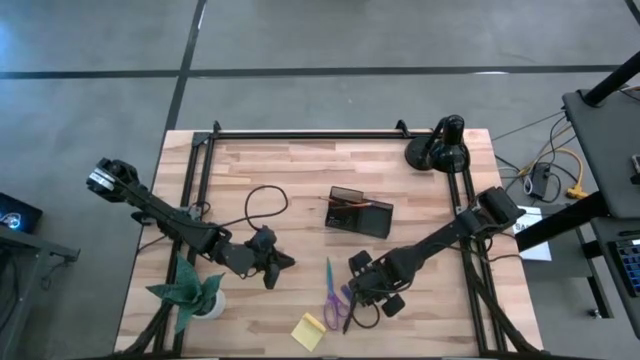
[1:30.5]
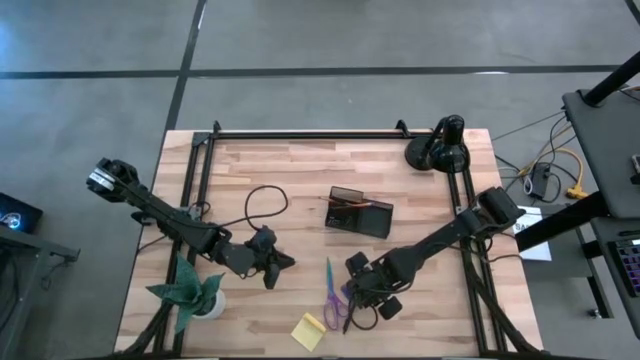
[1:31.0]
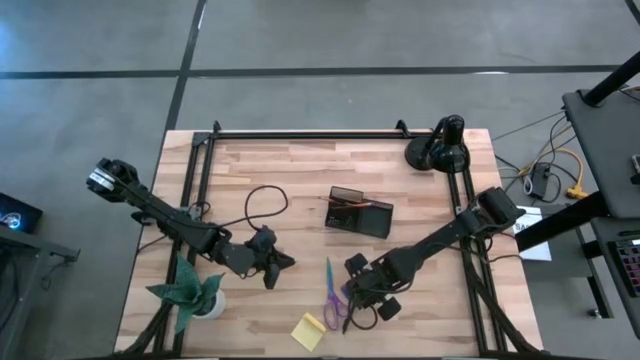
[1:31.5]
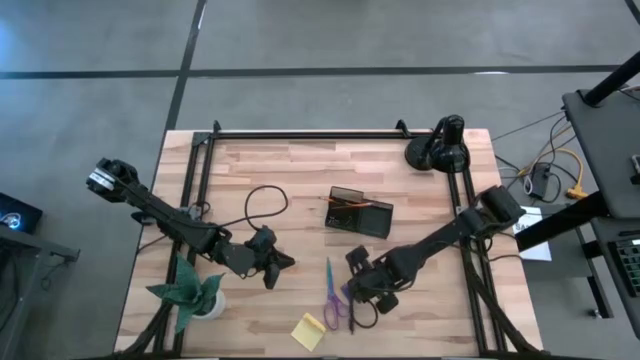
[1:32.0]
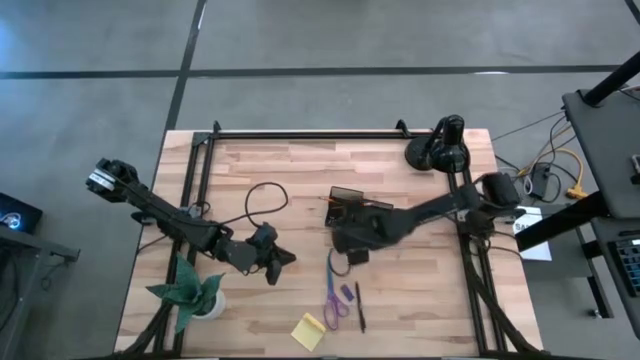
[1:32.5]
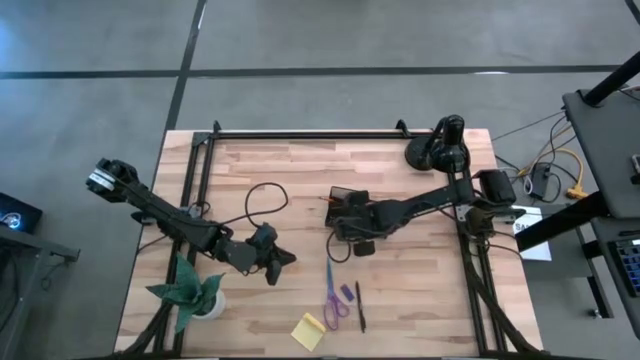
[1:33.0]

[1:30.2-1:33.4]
Task: Pick and place office supplies into organizer
Put the black binder clip into the black desk organizer

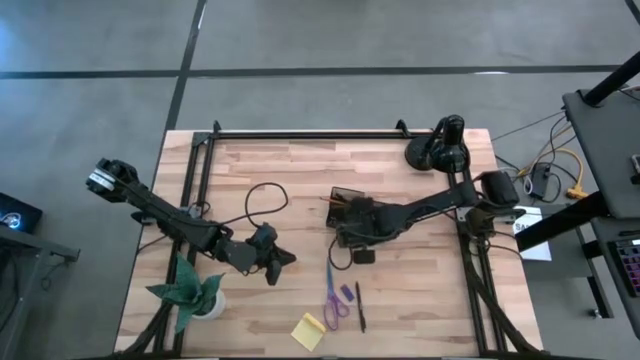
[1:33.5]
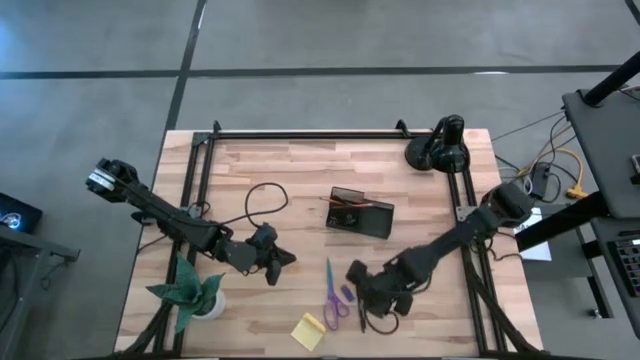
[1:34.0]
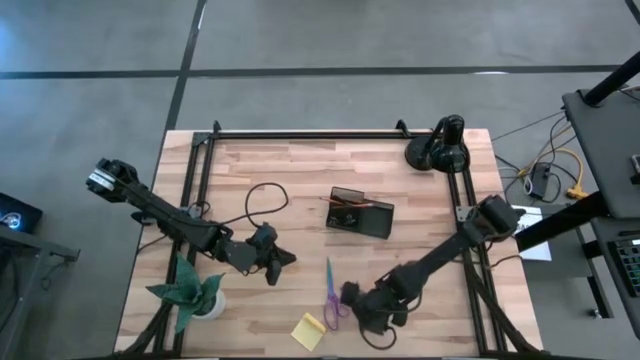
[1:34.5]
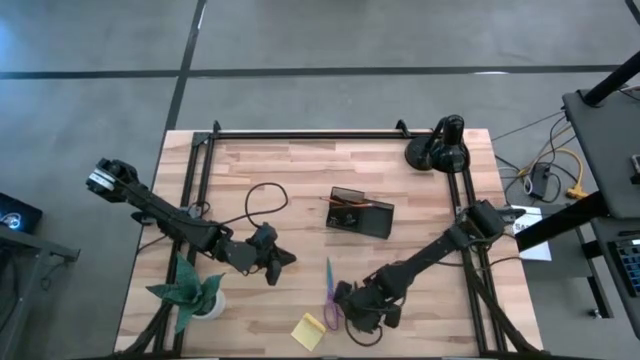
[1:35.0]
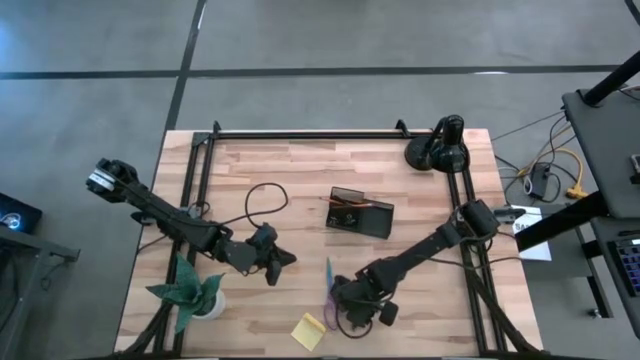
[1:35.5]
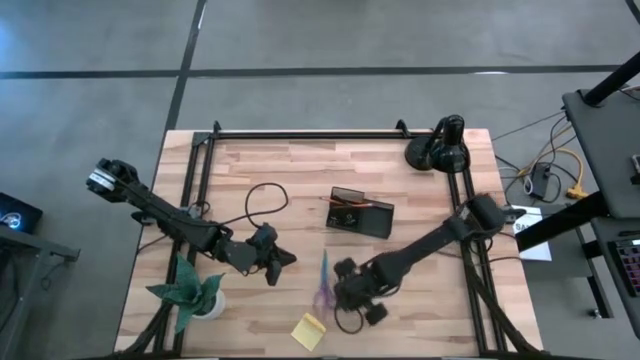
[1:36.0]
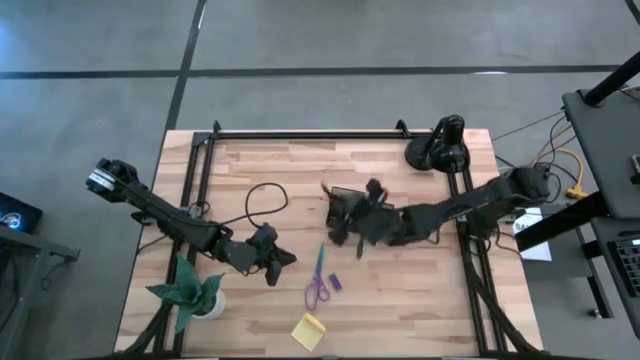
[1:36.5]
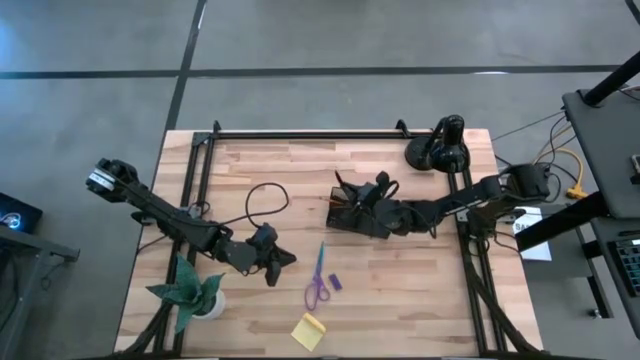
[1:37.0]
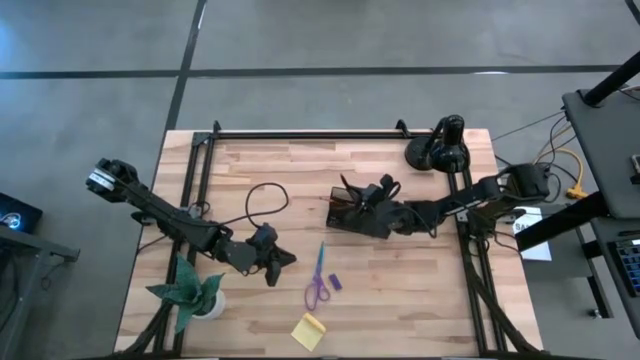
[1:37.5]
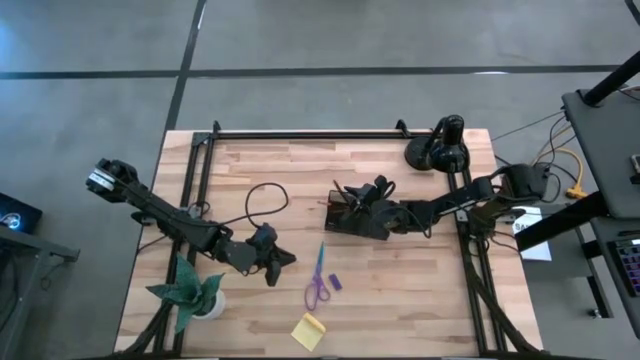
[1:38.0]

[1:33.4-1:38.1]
Put the black pen into the black desk organizer

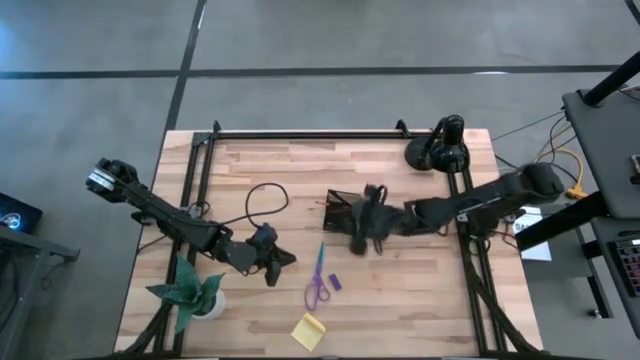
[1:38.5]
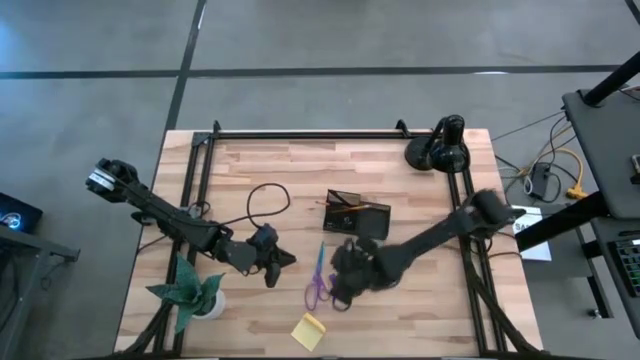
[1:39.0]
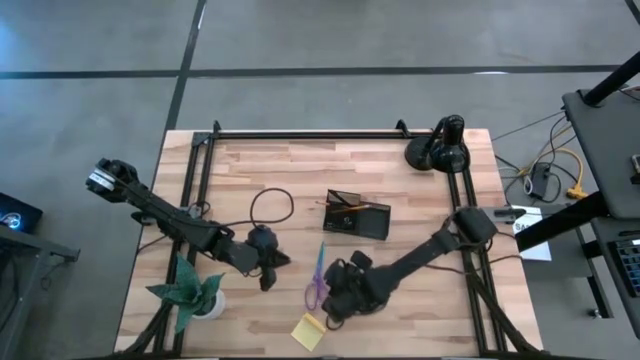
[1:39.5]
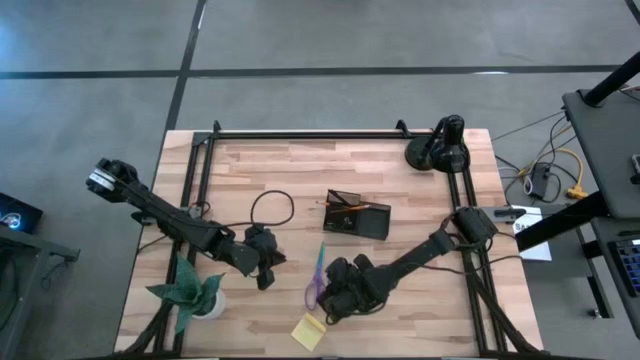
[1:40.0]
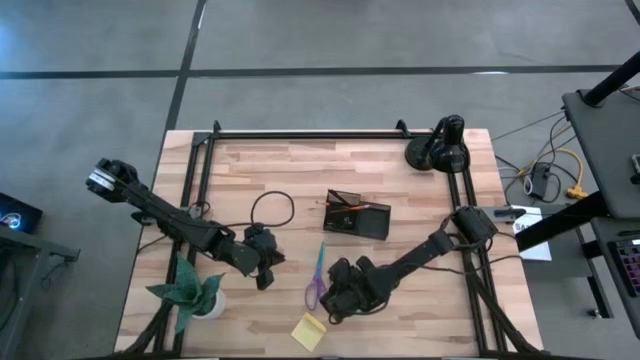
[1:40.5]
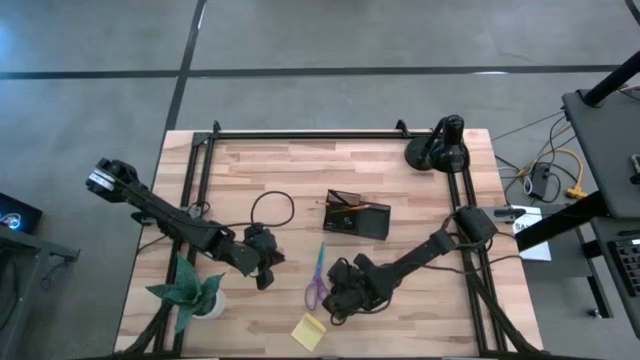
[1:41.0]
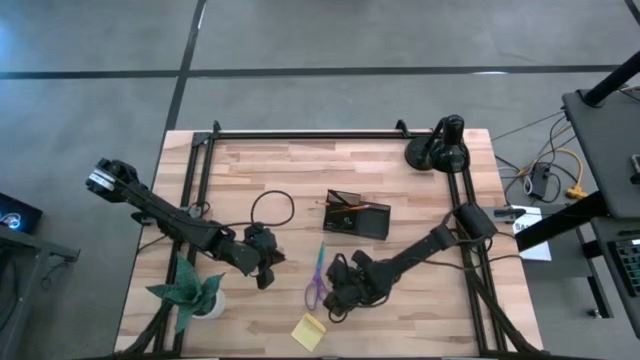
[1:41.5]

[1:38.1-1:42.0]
Put the blue eraser into the black desk organizer

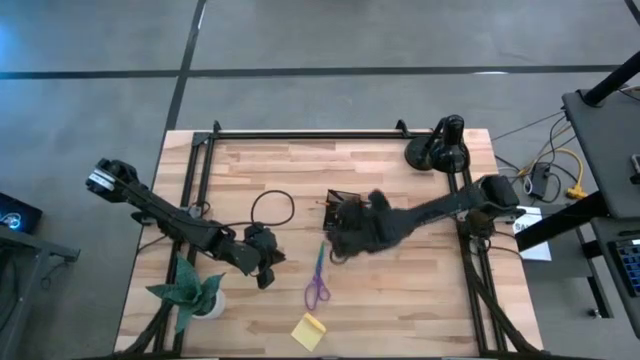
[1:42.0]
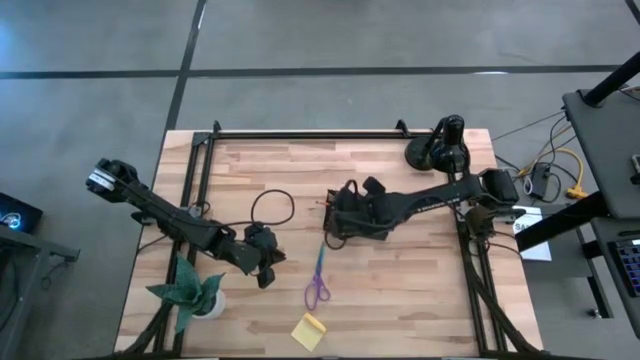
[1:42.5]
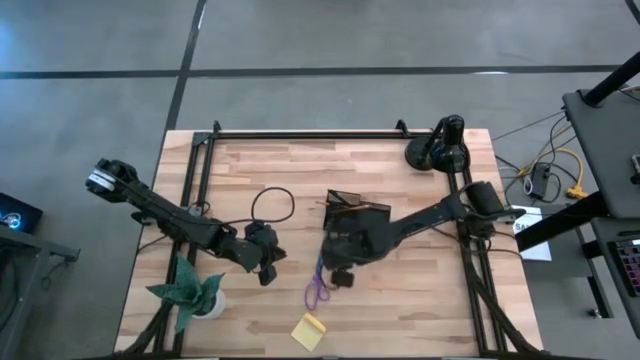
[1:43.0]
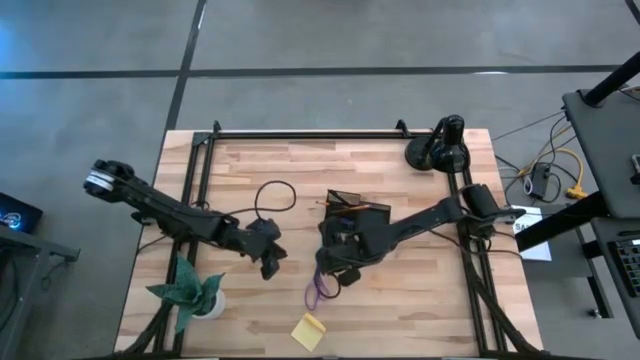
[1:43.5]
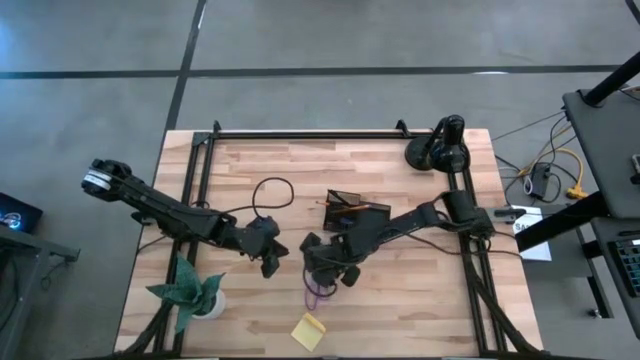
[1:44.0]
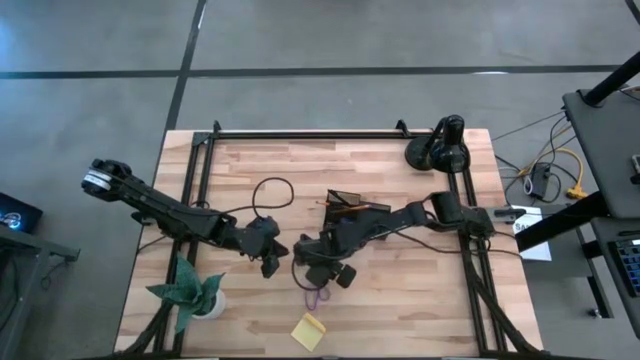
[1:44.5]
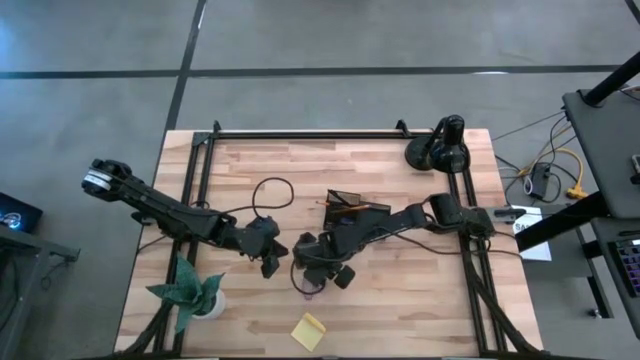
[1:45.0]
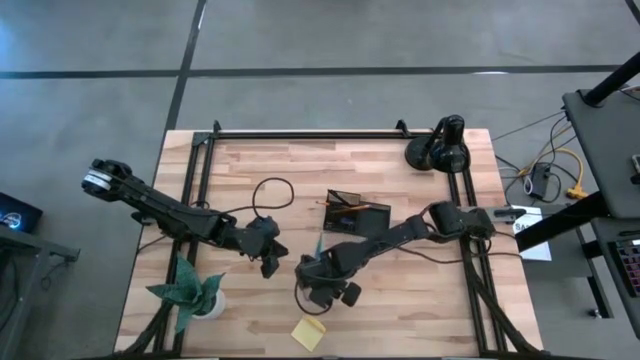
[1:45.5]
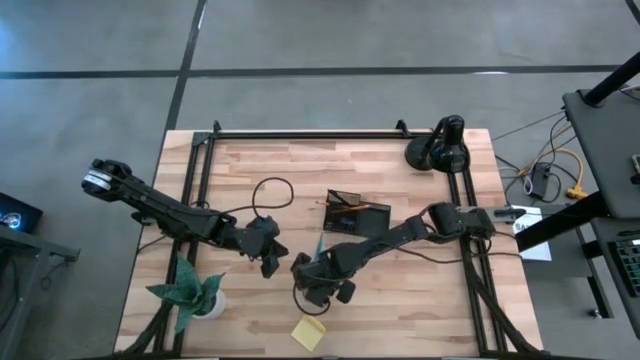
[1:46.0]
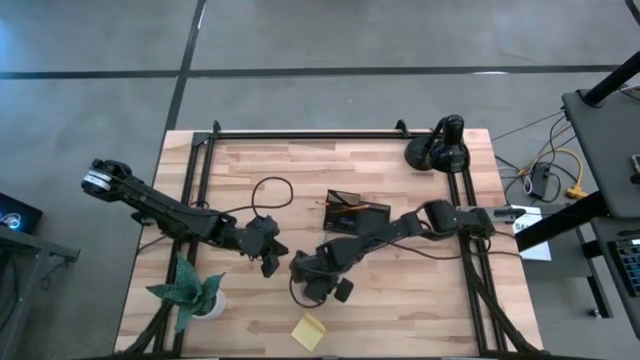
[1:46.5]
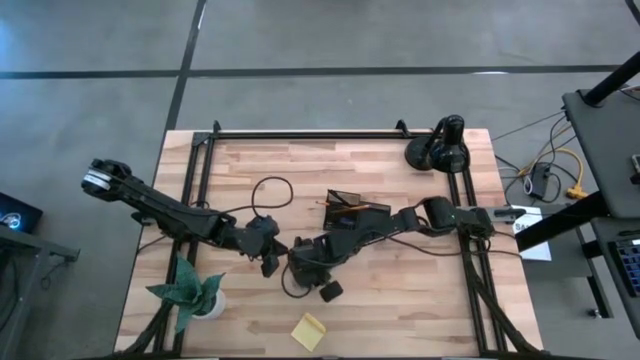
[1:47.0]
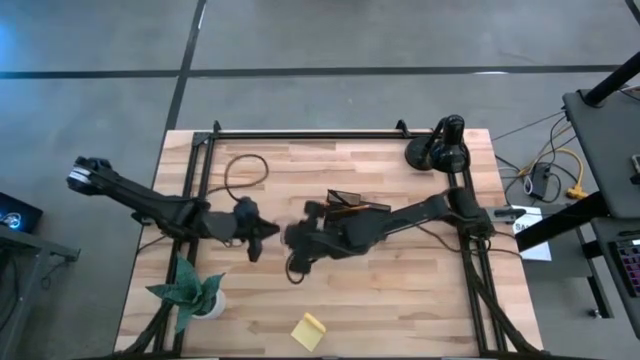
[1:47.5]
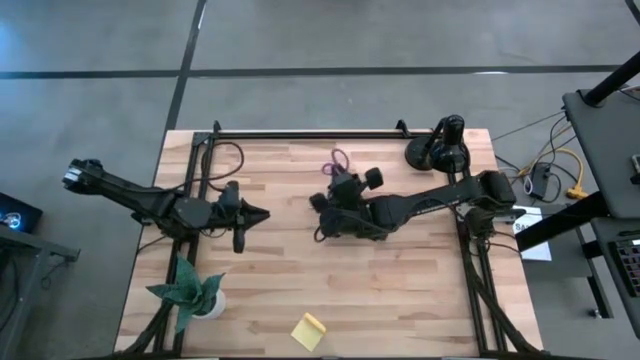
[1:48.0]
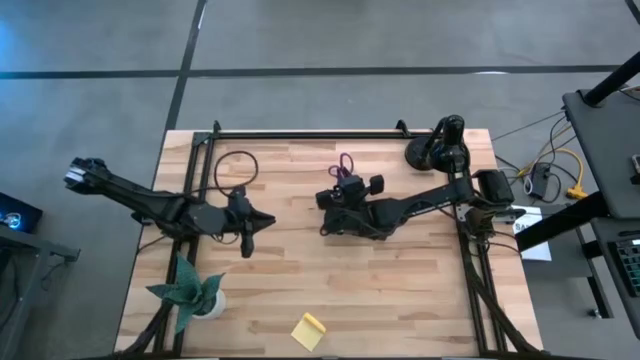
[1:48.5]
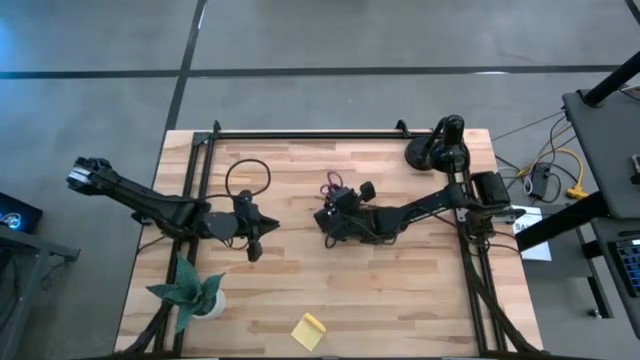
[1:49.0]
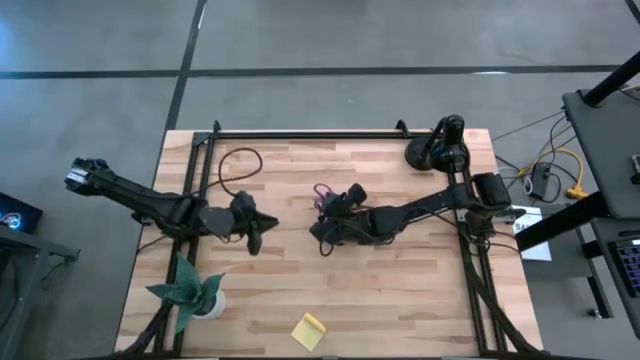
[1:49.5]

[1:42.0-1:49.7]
Put the purple scissors into the black desk organizer

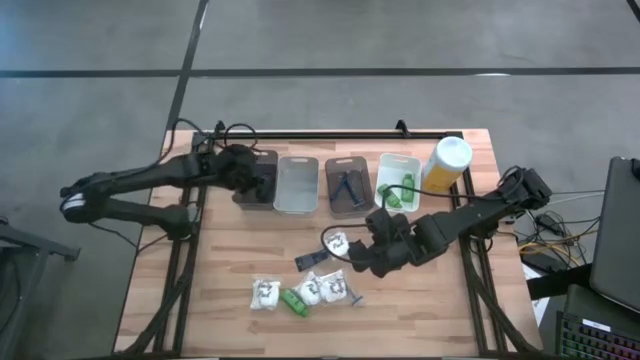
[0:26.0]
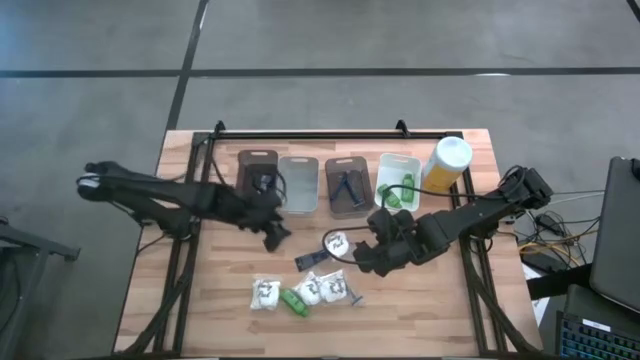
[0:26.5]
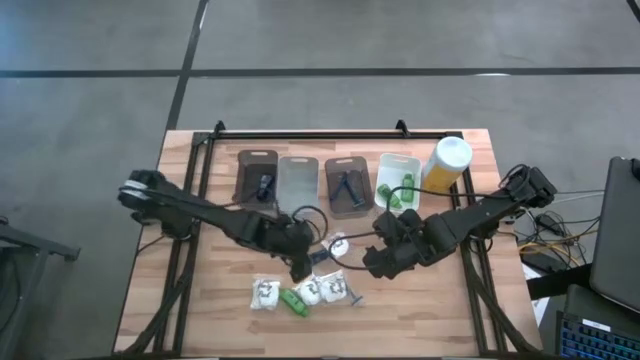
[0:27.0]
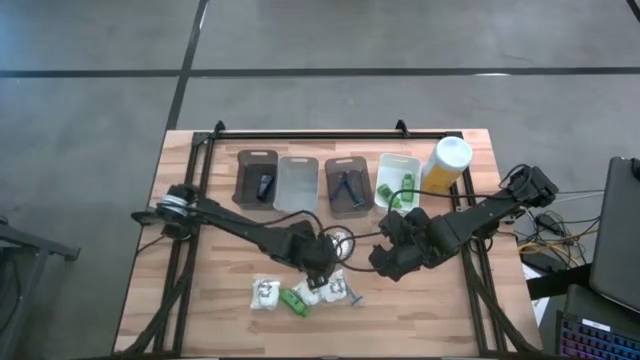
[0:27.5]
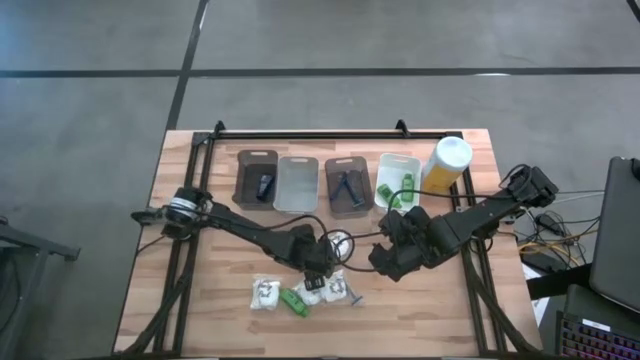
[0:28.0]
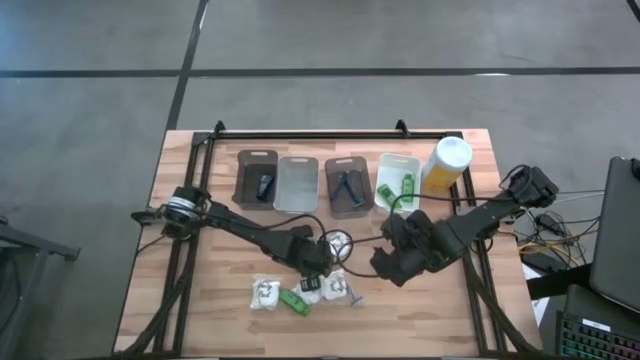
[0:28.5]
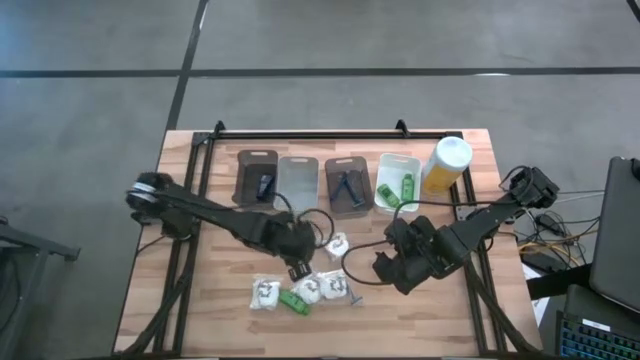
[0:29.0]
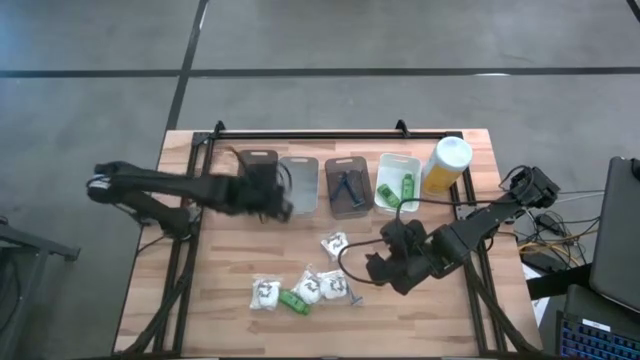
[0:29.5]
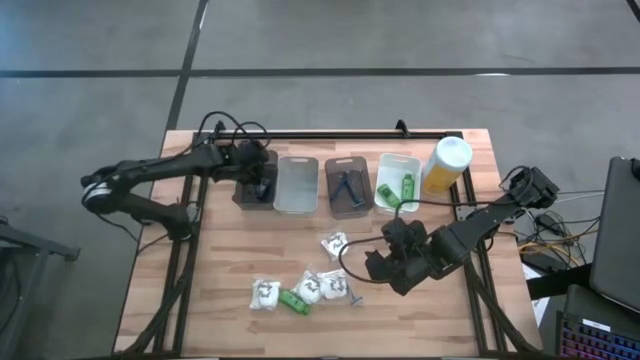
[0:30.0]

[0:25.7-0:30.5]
Task: Pick & Place Travel size toiletries
Put the blue shave cream into the left black bin
